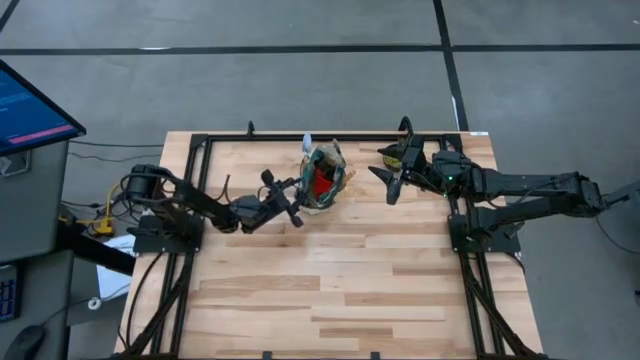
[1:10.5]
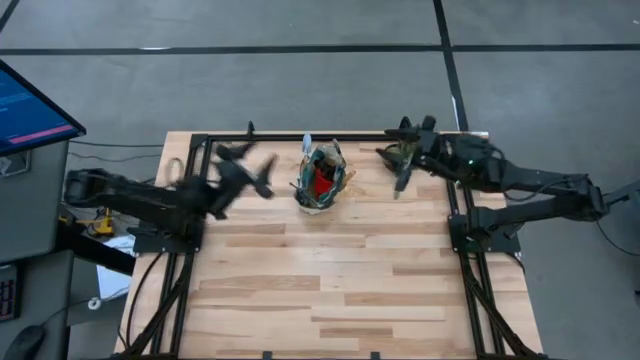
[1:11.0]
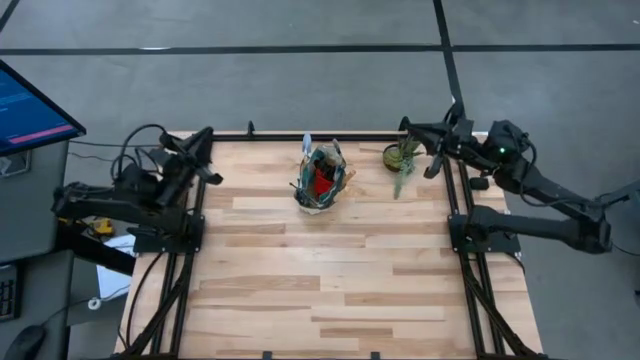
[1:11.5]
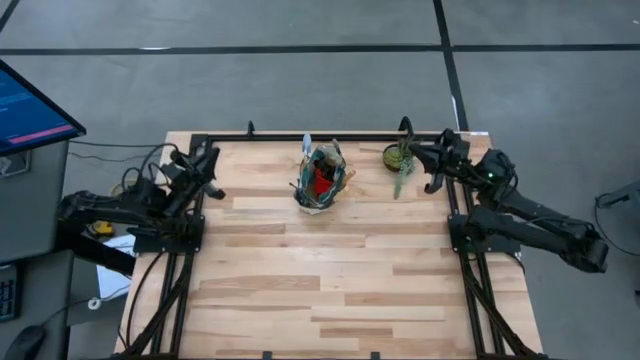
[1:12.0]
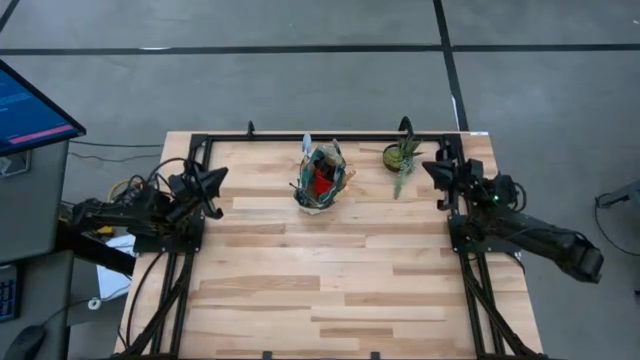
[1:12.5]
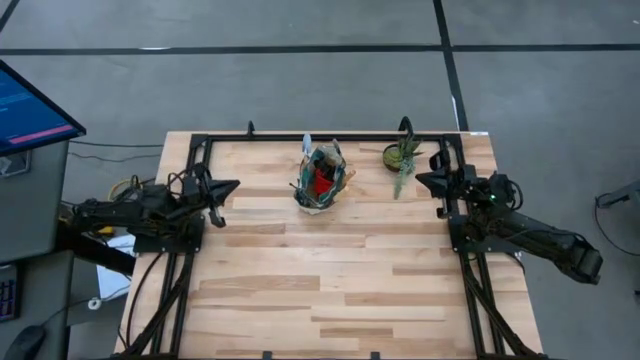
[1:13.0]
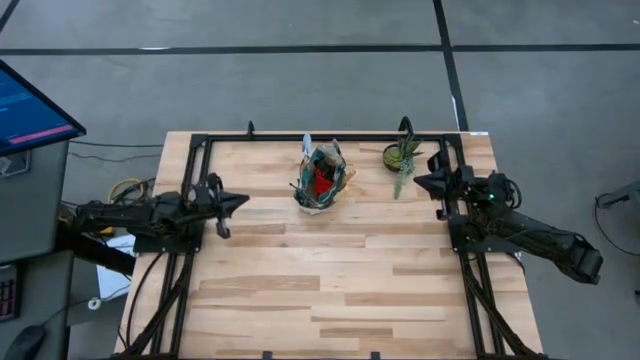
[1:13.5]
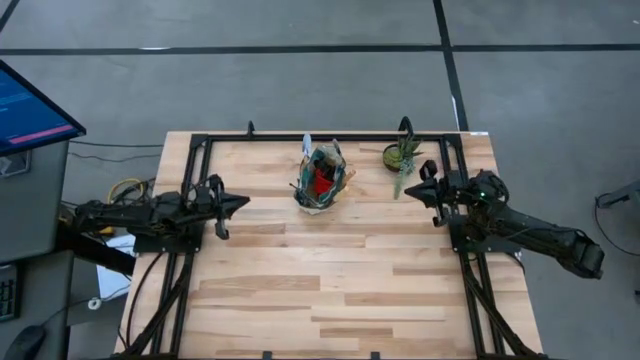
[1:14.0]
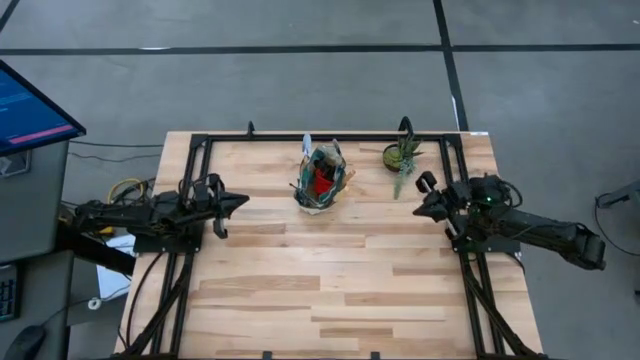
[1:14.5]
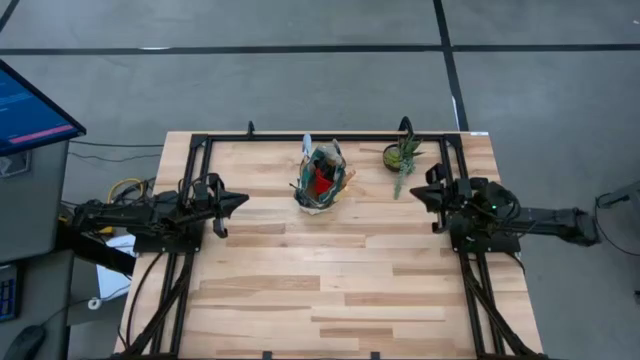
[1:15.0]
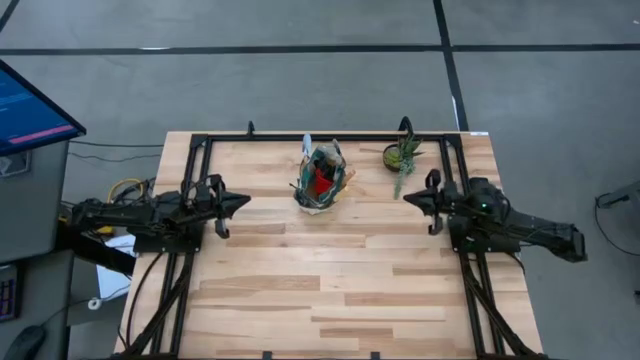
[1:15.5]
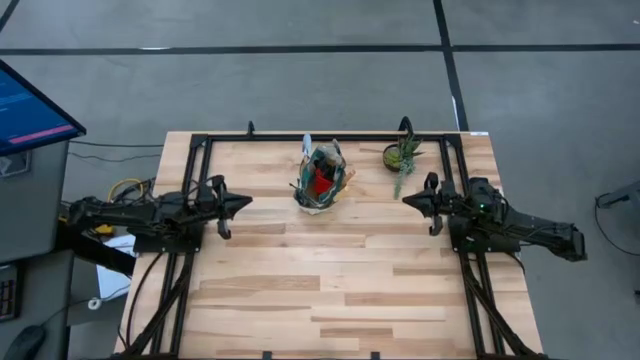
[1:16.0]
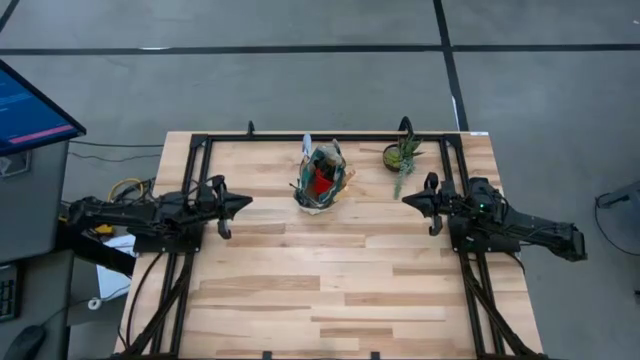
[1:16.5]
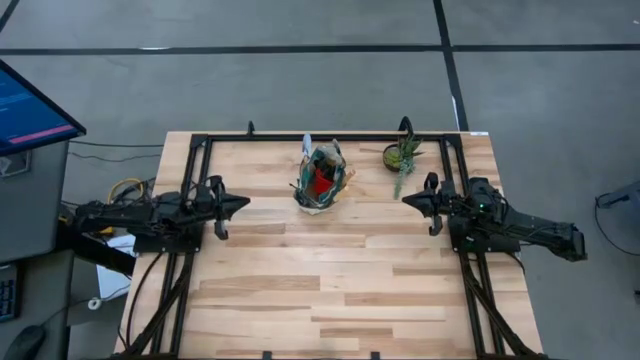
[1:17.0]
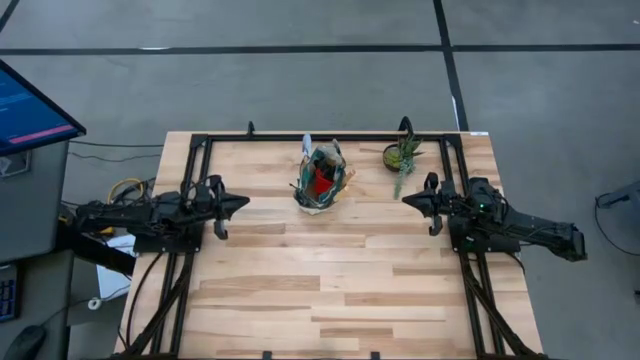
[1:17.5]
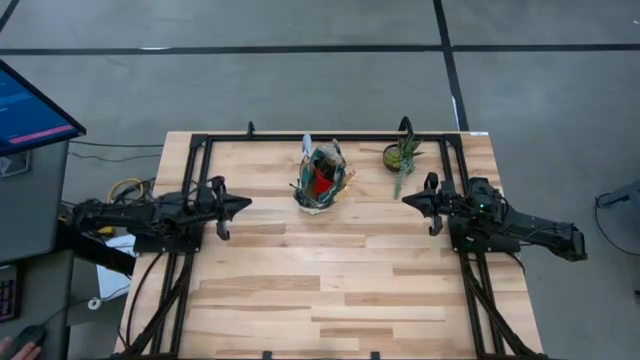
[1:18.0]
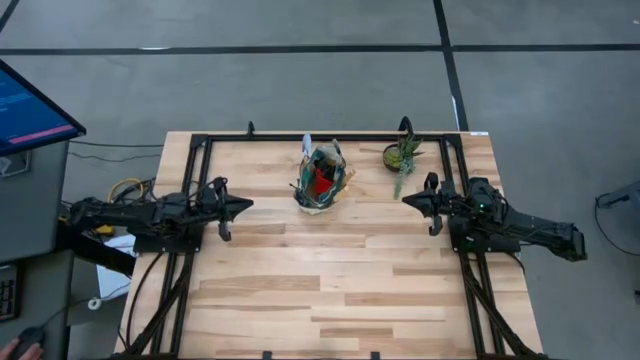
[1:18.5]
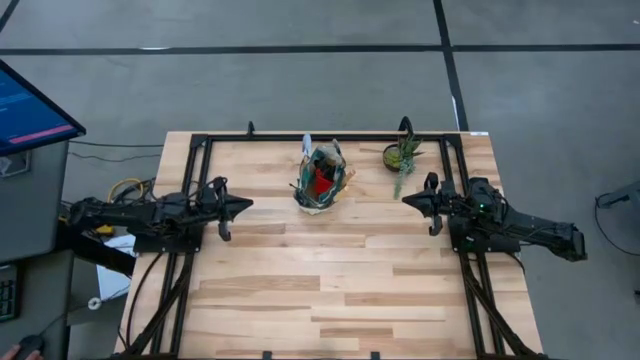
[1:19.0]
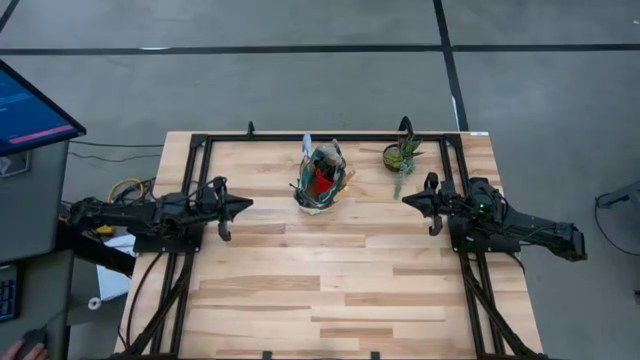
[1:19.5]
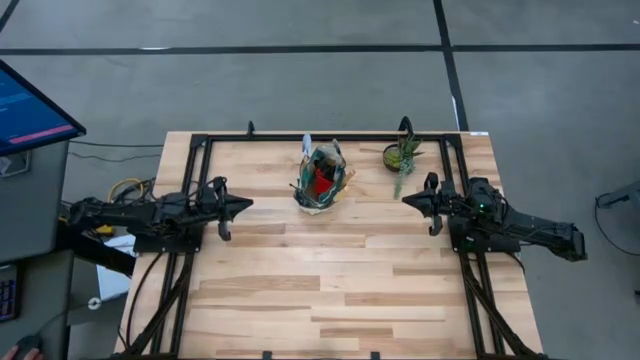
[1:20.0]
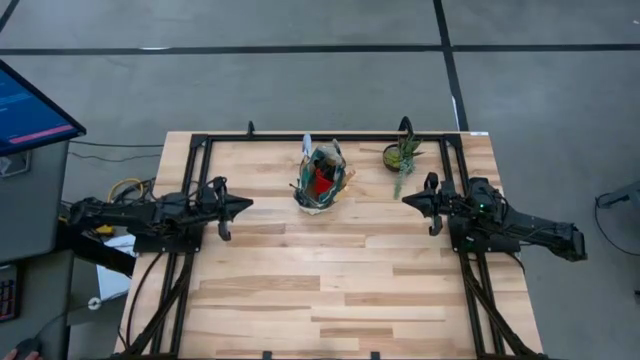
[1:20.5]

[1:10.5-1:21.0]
Task: Pick & Place Garden tools in Gardening bag
Return to Home Position

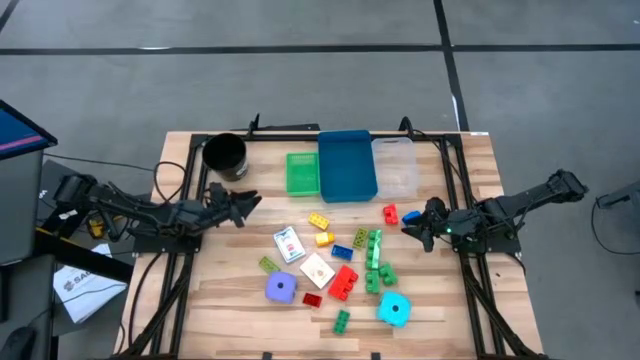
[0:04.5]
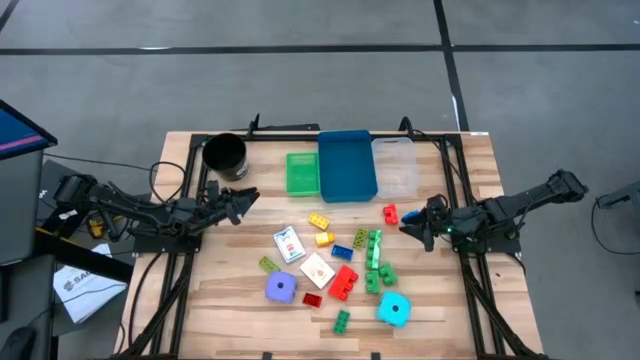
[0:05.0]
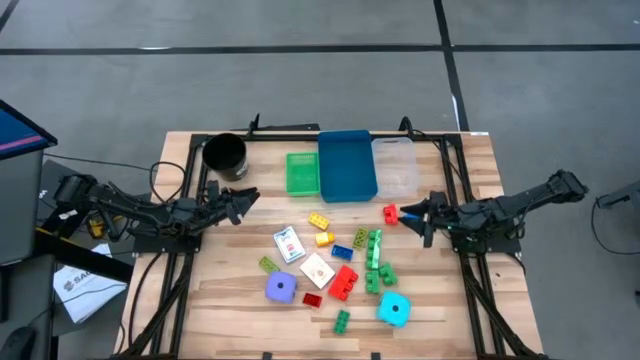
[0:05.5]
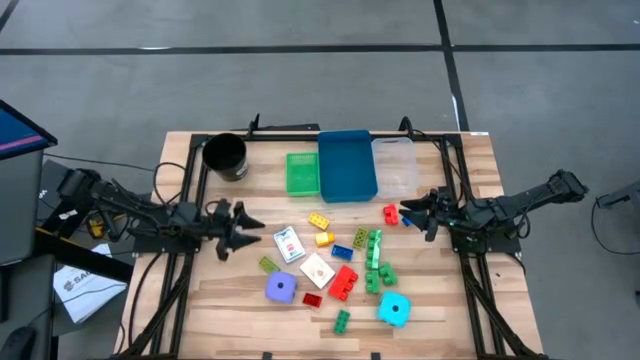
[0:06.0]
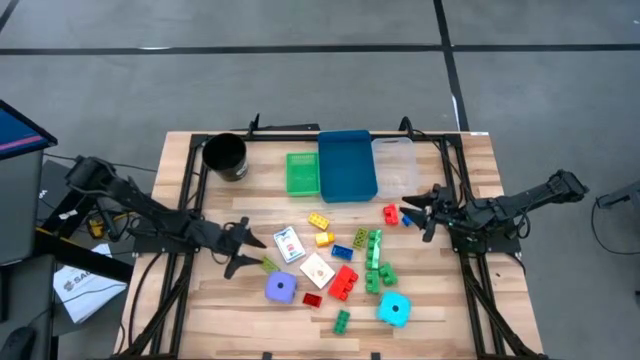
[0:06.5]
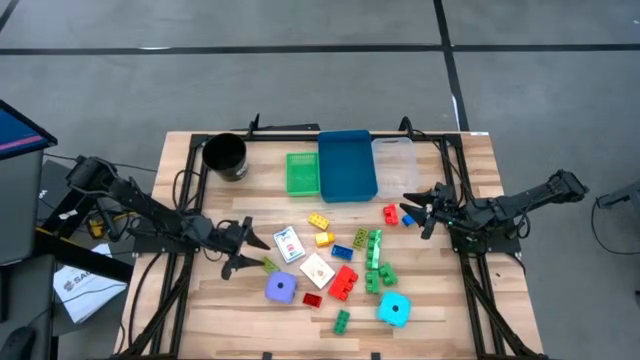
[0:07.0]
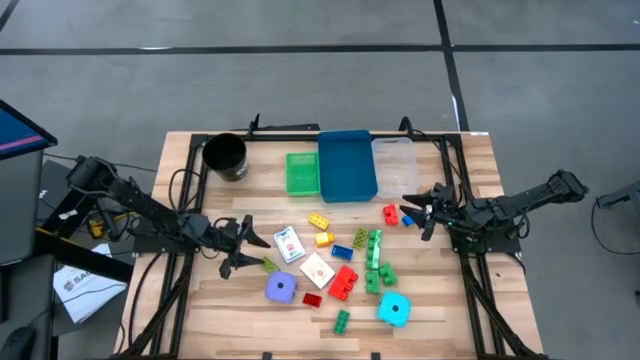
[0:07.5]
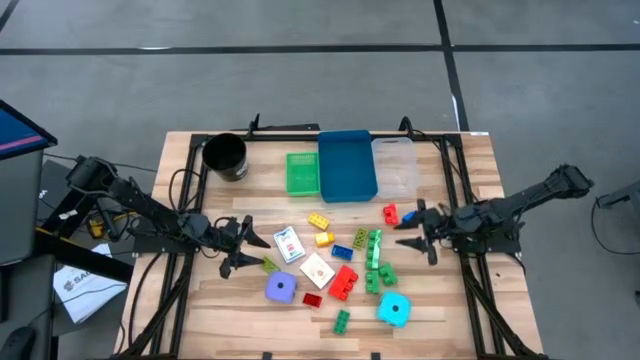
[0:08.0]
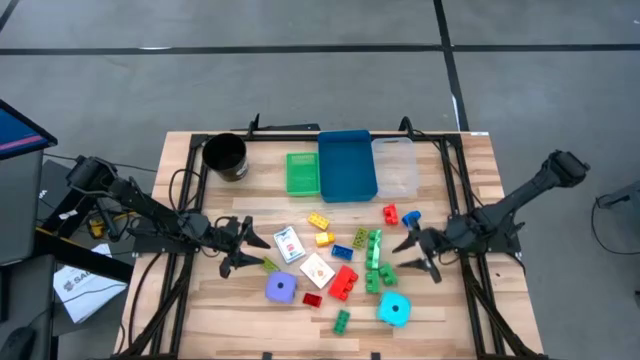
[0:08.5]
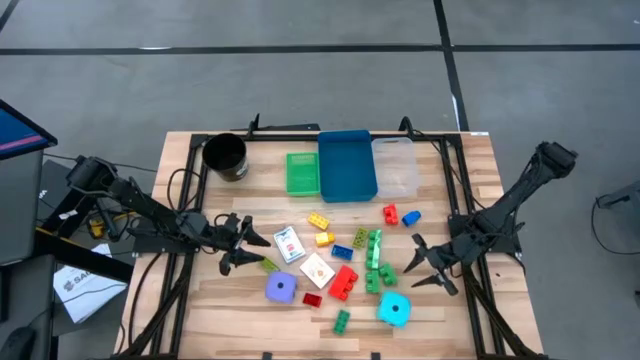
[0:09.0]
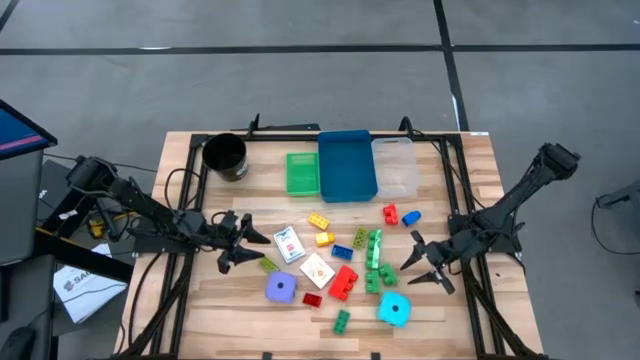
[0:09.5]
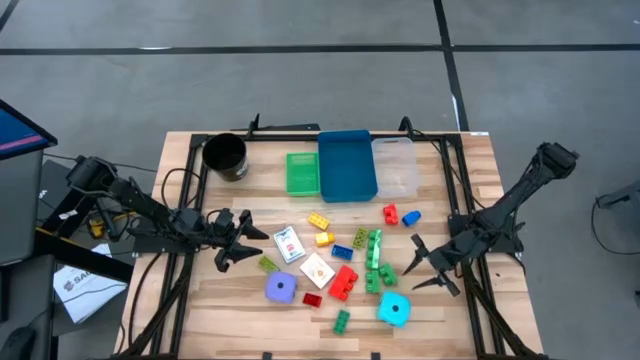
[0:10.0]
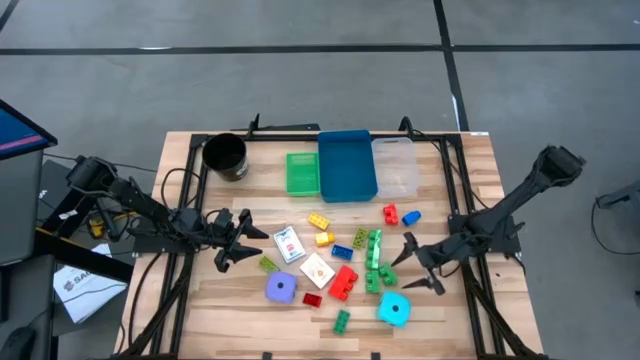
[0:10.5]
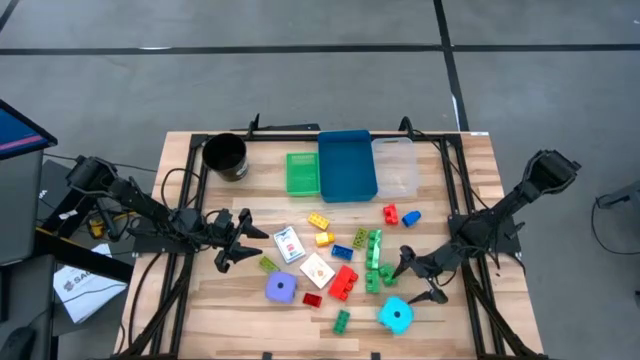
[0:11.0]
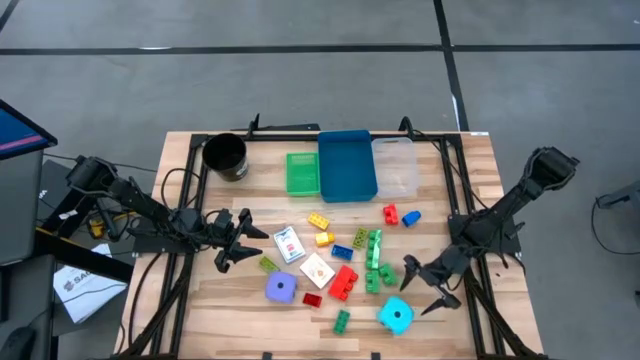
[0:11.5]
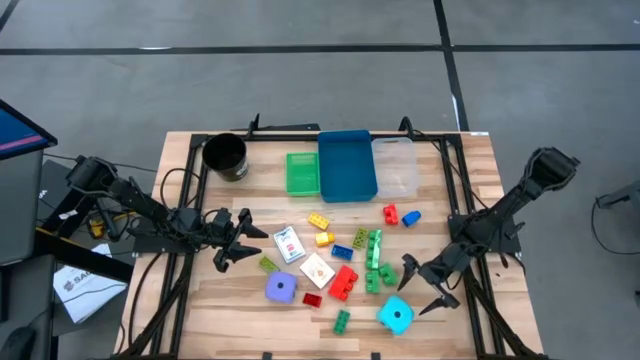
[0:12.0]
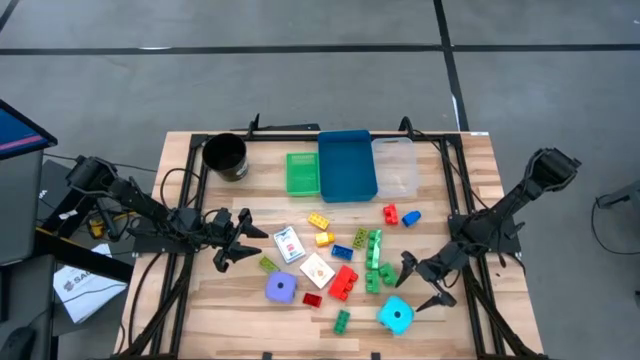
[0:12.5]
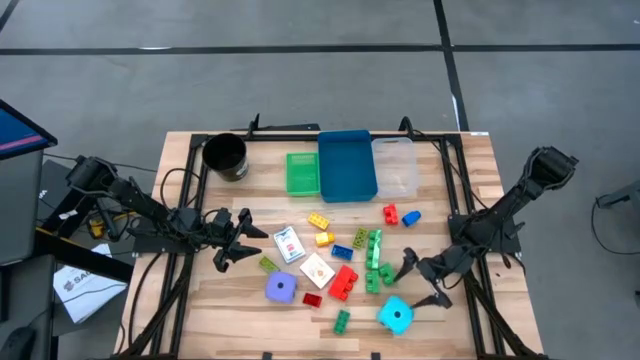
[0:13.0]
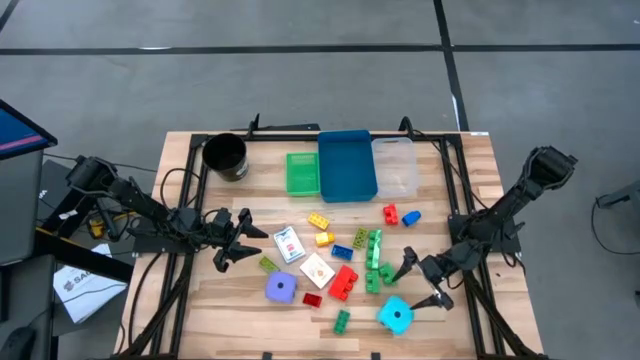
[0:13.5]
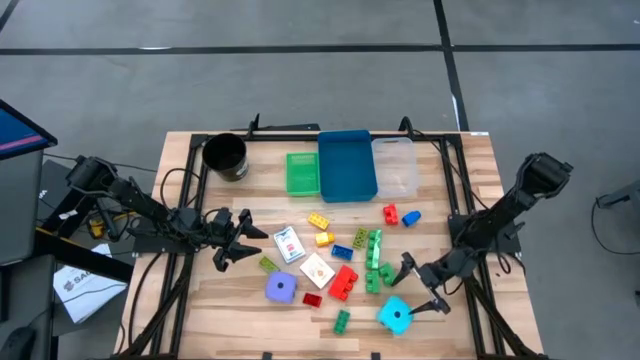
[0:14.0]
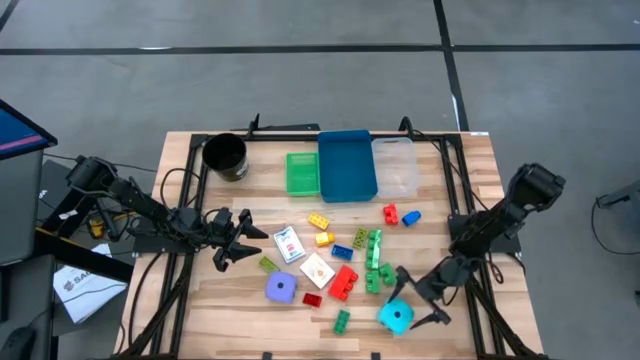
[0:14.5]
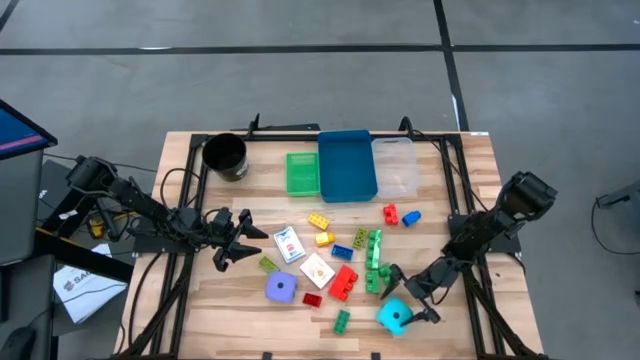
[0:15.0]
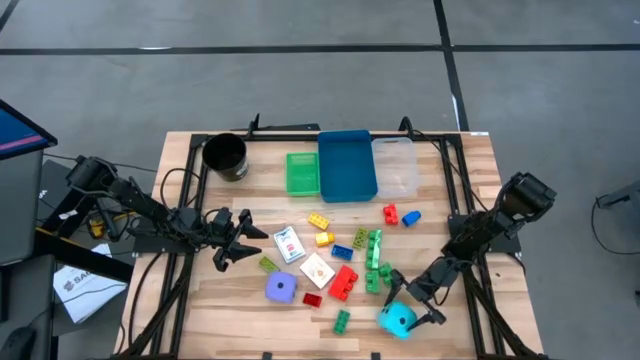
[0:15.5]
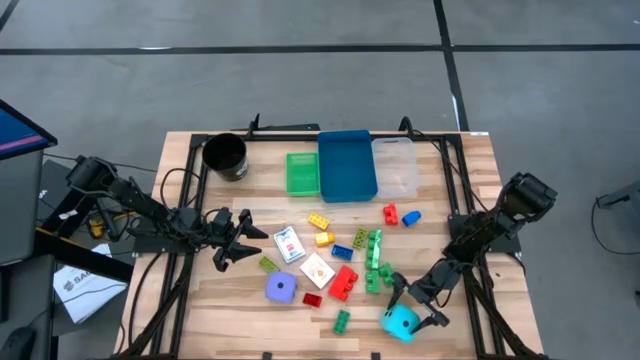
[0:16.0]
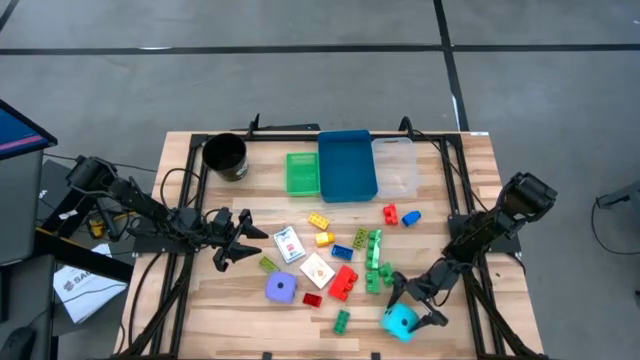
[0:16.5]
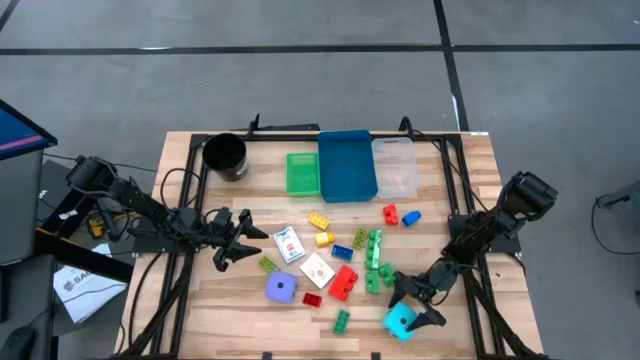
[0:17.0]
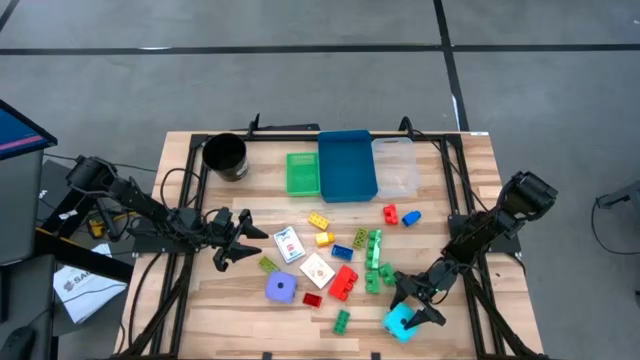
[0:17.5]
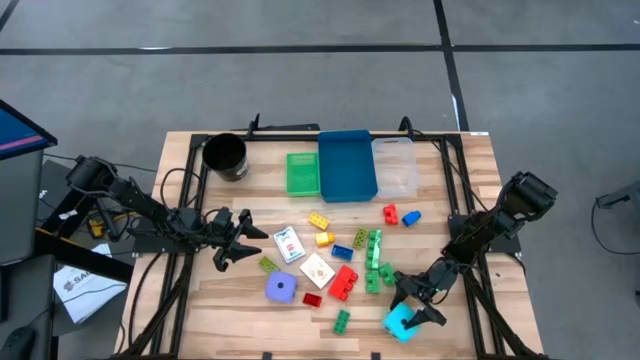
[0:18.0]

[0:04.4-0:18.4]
Task: Pick & Place Toys
Put the light blue dice into the transparent bin
